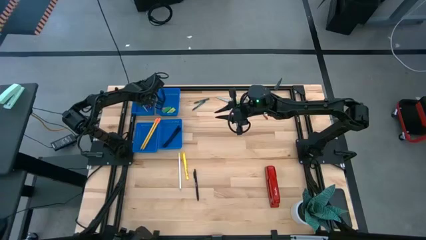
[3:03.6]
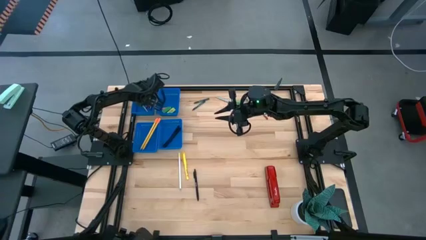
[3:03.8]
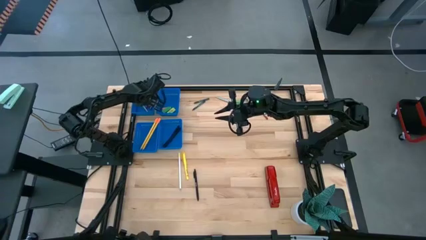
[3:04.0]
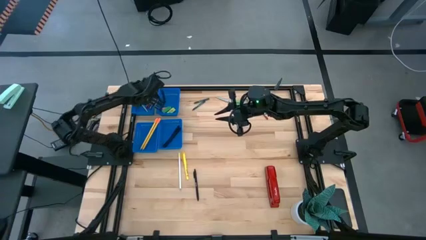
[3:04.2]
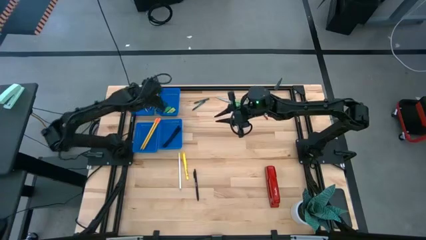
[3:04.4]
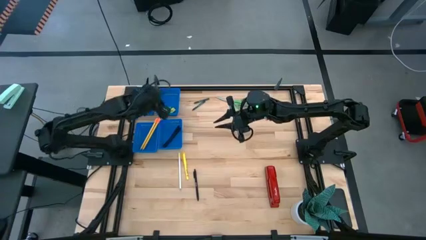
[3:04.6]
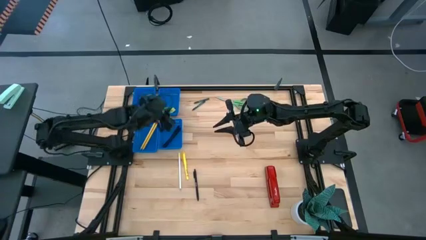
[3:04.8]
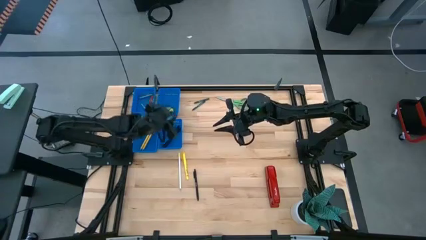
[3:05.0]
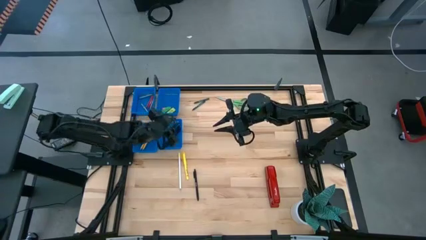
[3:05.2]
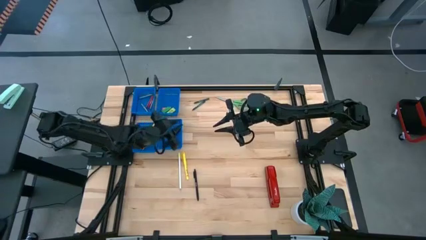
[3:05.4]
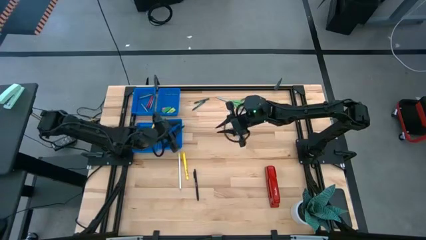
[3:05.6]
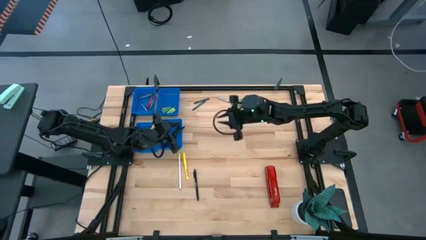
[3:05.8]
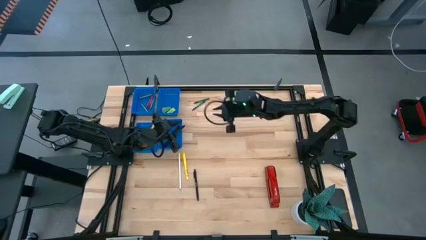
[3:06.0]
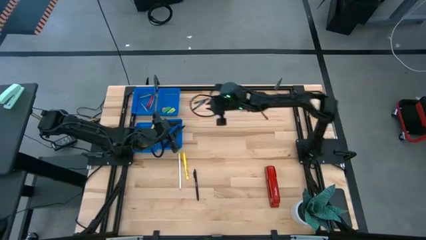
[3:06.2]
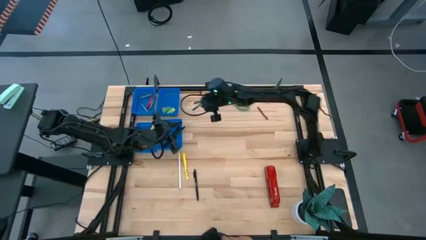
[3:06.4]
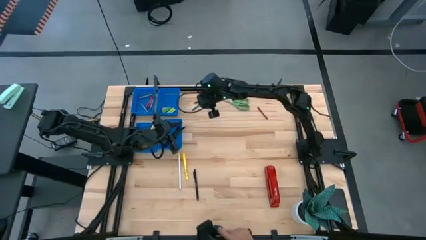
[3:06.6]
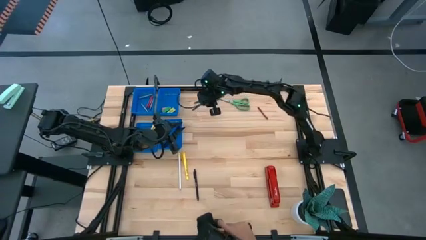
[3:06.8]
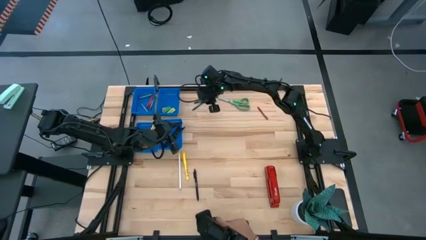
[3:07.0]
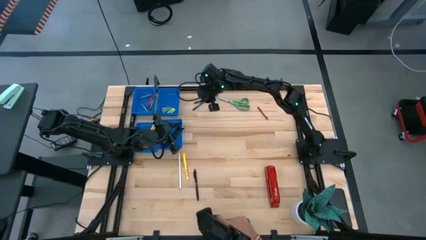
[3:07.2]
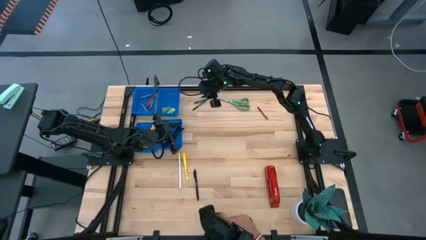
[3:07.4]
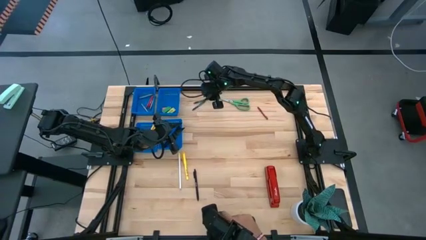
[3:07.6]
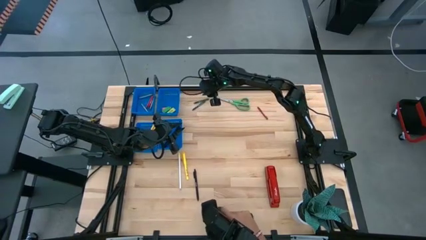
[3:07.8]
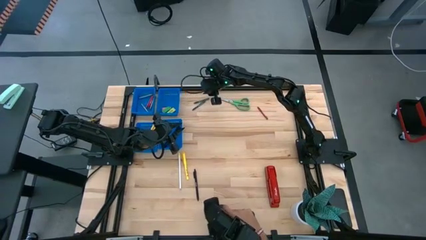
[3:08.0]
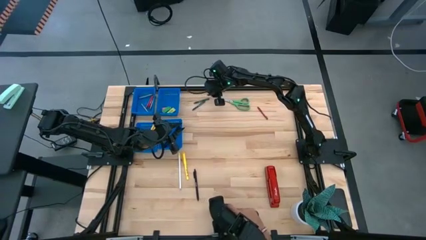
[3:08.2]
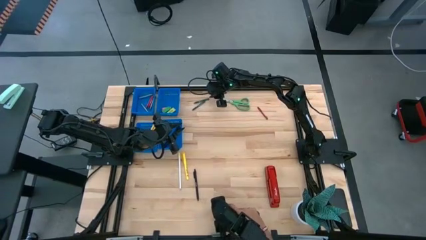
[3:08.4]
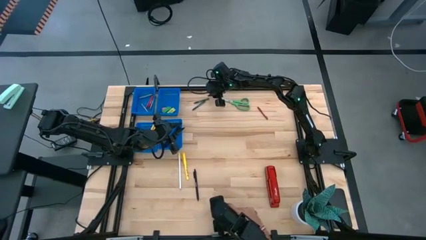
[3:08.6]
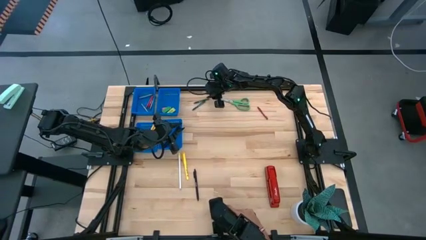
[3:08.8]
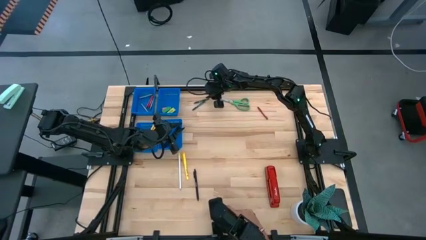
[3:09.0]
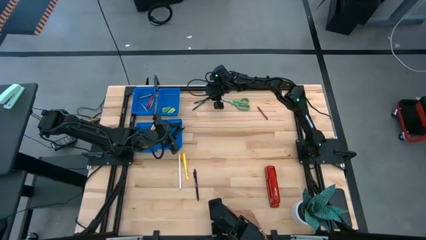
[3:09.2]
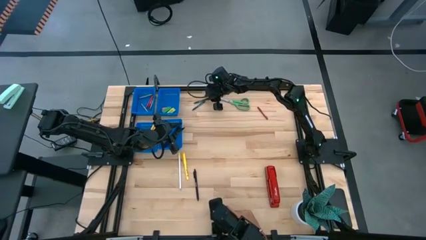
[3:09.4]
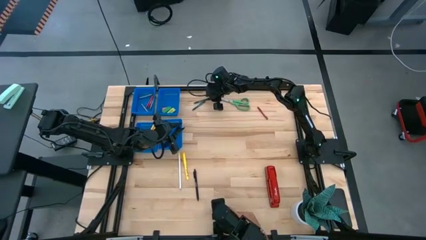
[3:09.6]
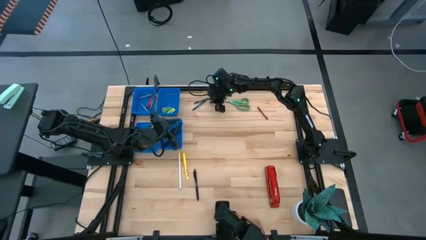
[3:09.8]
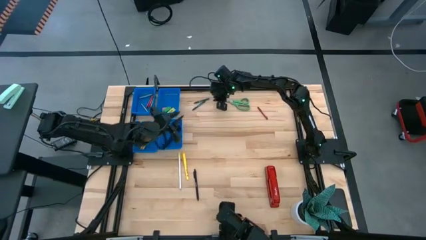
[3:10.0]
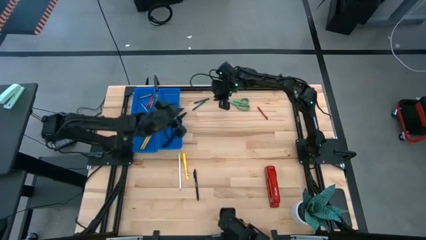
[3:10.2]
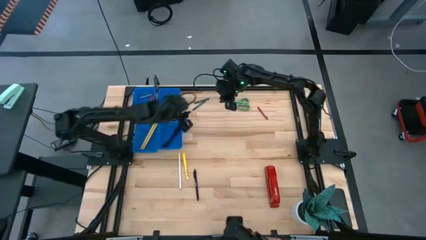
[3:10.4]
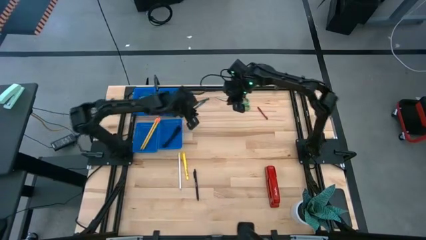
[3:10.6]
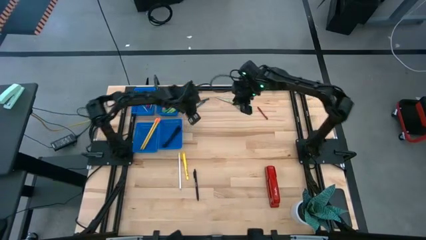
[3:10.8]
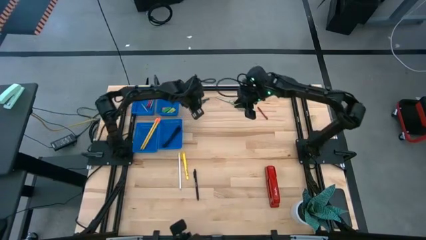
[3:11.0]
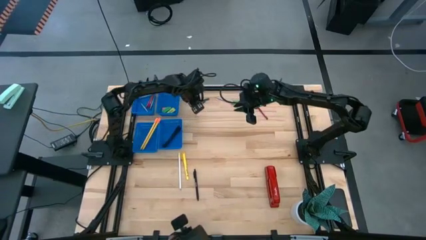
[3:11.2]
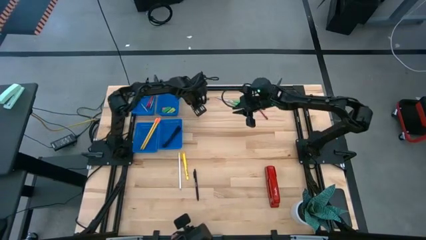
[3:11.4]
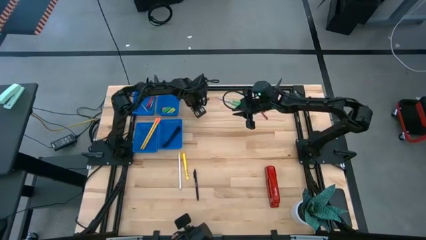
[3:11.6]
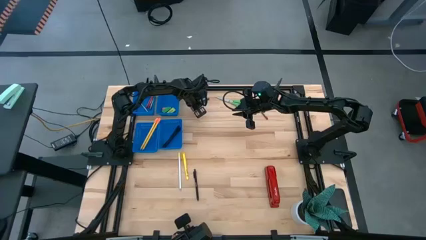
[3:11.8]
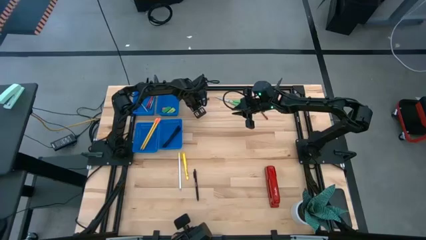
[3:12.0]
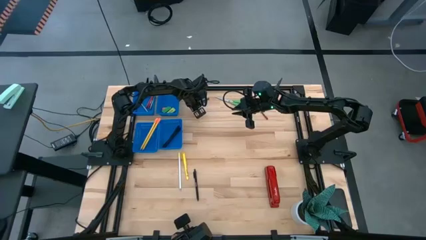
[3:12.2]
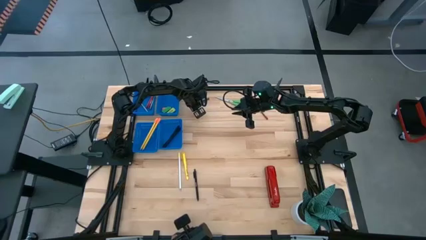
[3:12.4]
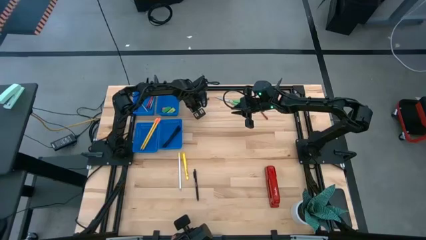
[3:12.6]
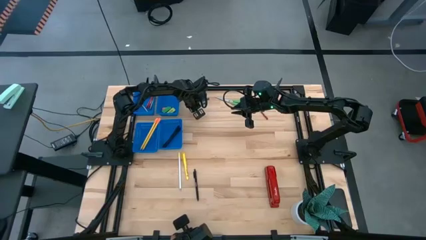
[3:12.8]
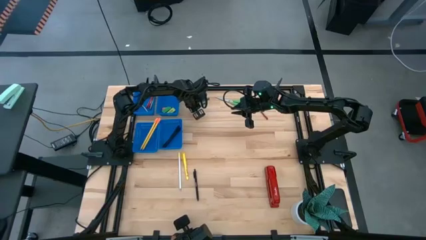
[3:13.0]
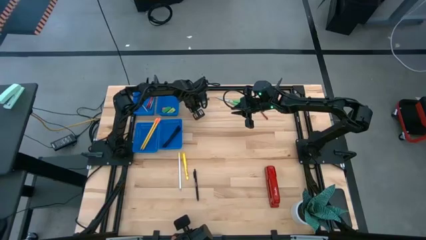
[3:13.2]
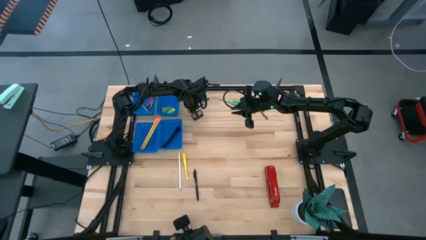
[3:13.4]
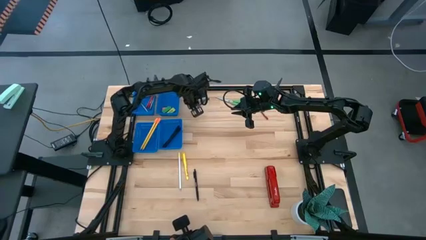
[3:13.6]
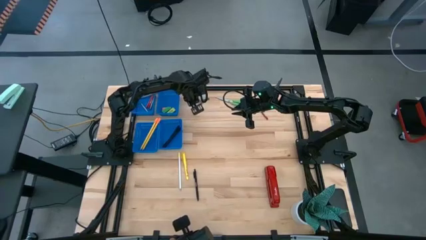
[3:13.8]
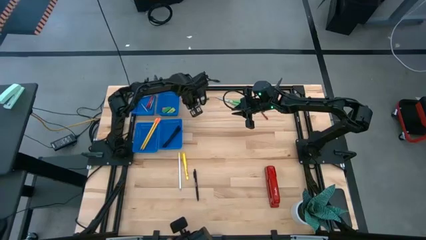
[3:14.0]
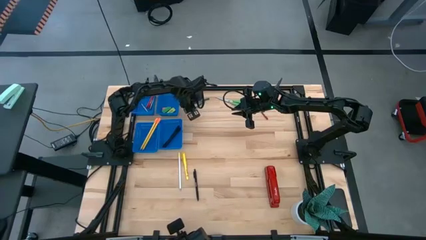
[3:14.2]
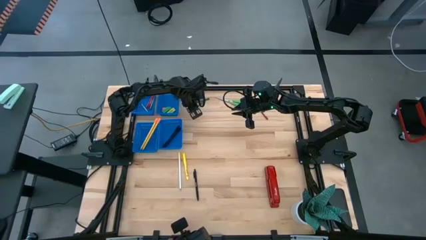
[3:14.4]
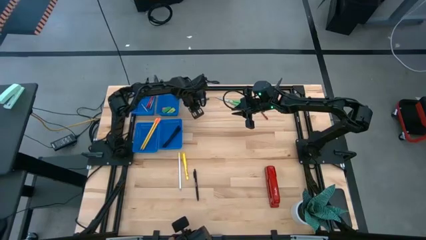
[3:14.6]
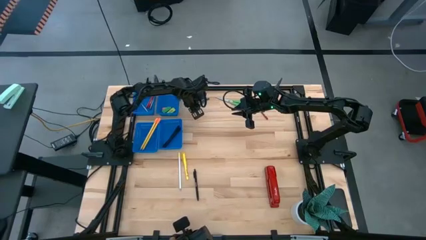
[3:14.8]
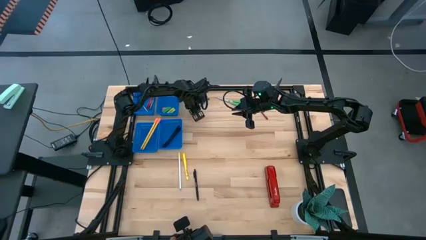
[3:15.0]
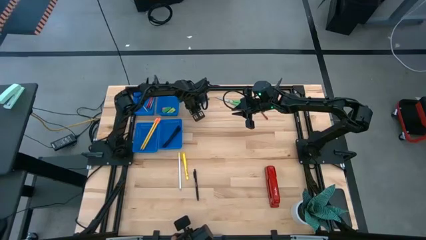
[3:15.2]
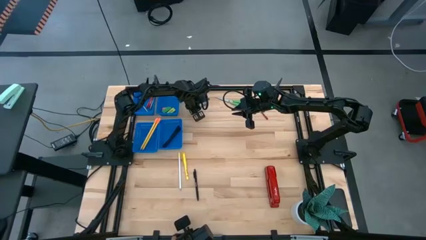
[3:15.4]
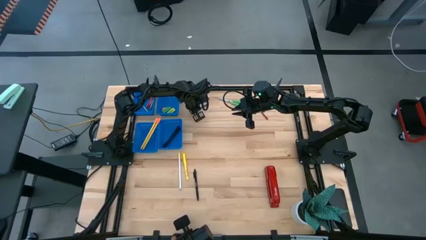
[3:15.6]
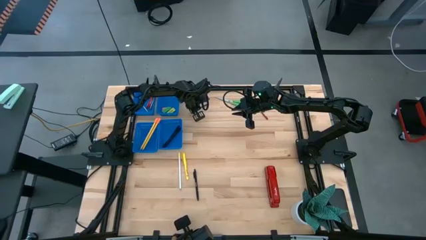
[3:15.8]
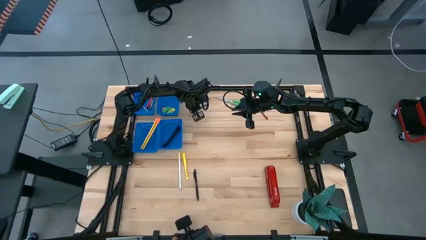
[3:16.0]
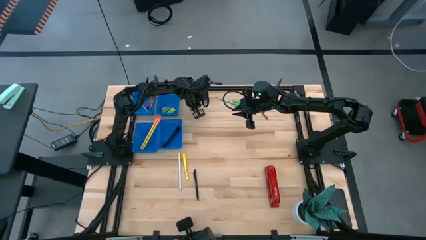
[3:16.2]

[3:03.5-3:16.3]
Task: Sort crayons/erasers/pens/pencils in bins
Put the green crayon into the top left blue bin

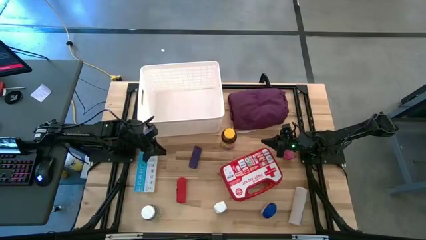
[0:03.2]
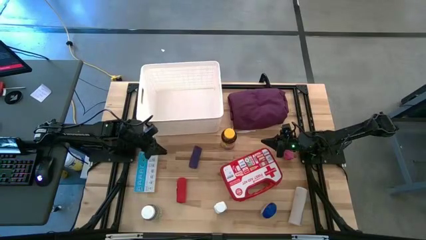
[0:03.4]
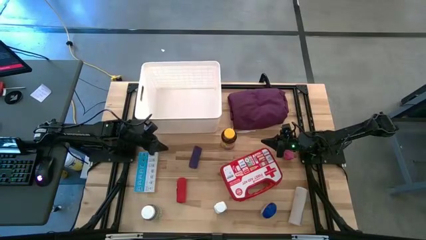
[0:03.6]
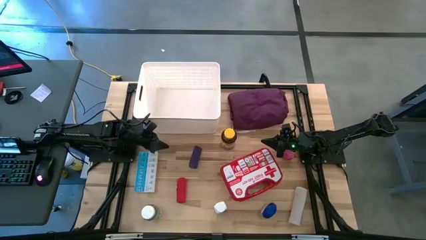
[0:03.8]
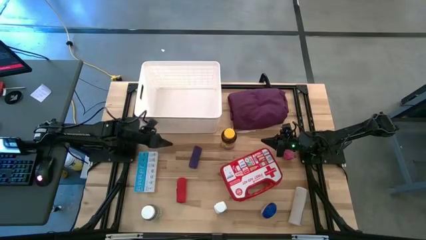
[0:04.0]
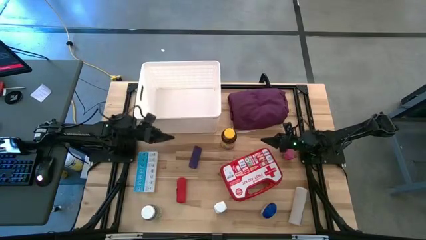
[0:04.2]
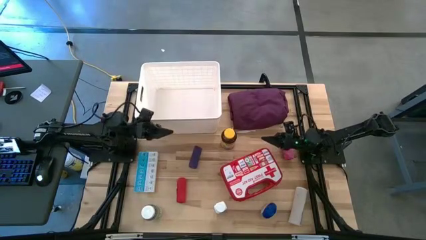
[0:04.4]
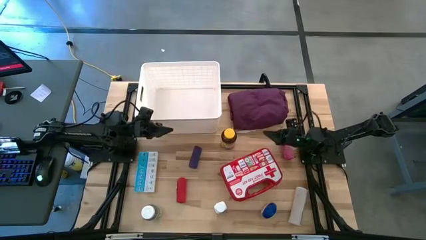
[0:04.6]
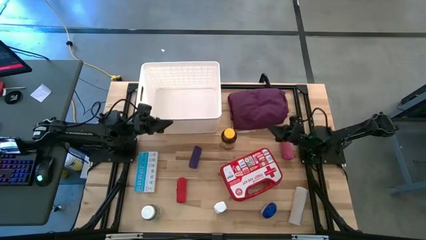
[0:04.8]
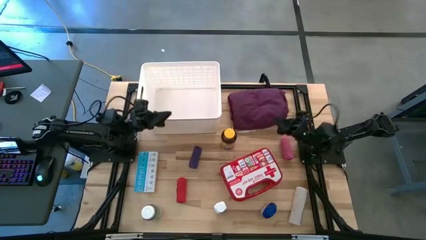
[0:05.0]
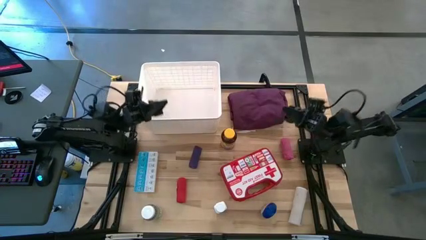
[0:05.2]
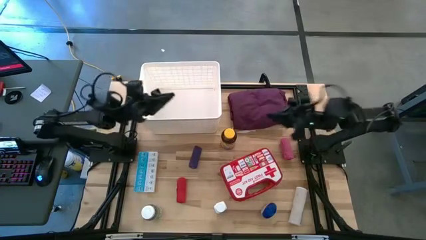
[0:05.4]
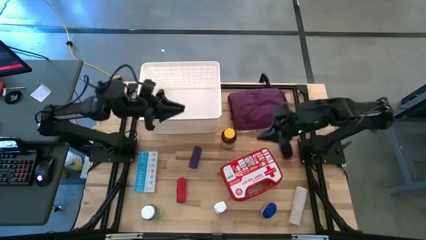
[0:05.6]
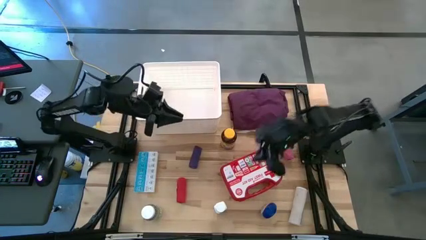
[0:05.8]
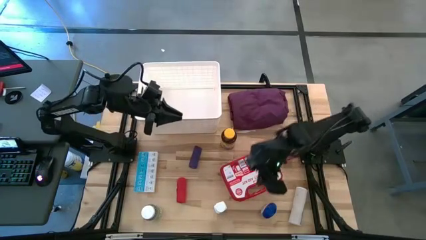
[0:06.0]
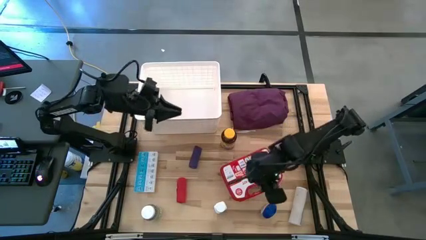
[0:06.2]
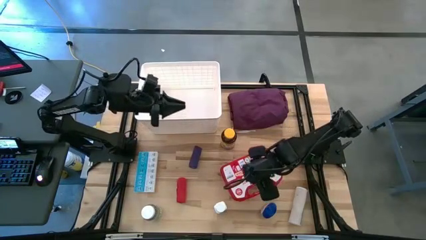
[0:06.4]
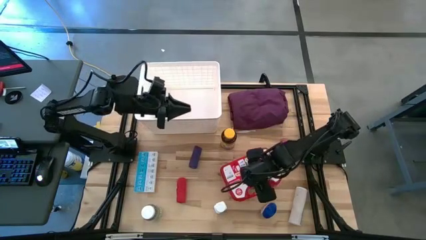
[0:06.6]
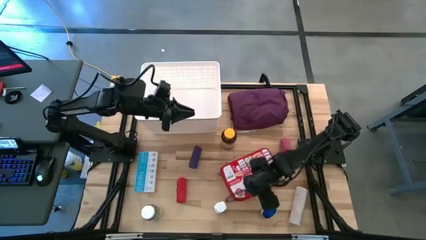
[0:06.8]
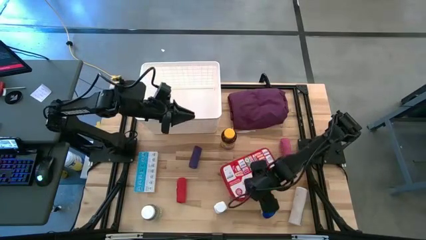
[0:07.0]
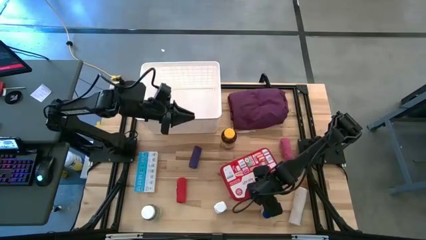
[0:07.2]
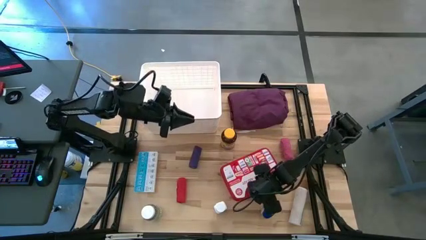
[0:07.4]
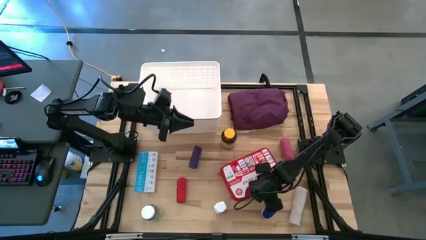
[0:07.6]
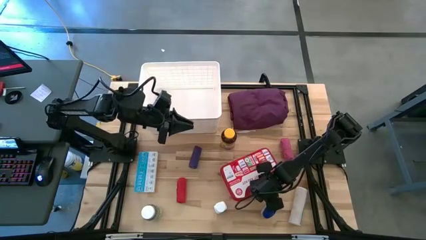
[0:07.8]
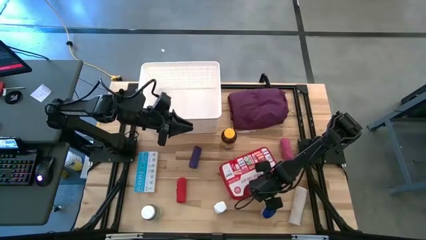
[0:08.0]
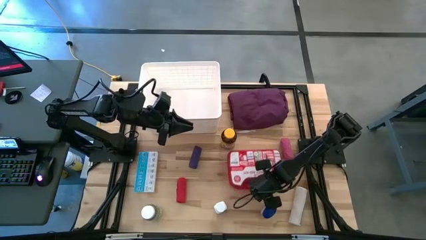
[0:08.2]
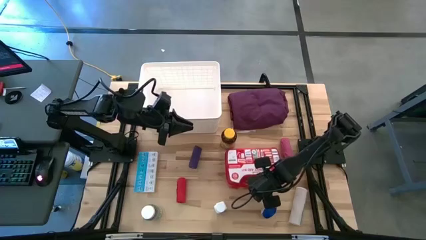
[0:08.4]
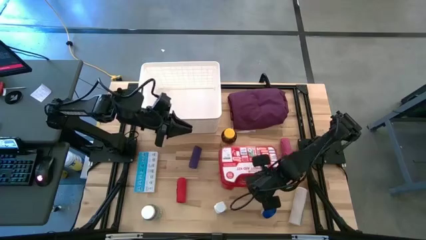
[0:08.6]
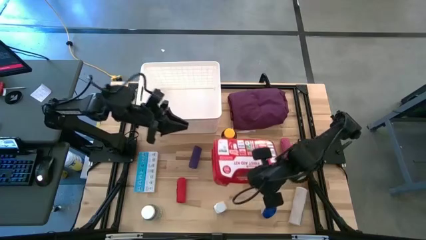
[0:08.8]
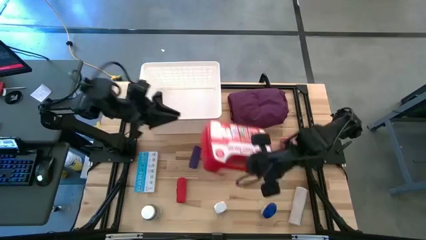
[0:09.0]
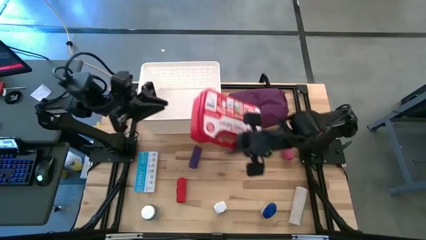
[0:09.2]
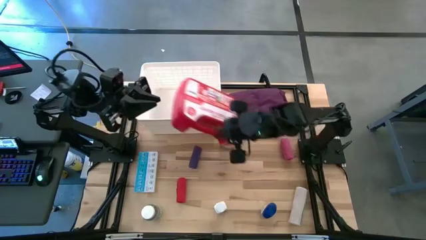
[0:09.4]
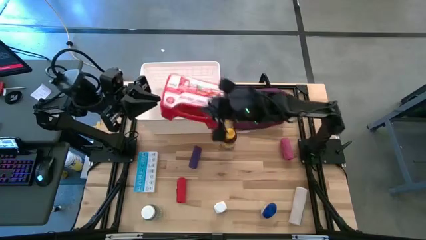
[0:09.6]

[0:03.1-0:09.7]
Task: Pick & place medical supplies in basket/bin
Put the red first aid kit into the white bin
